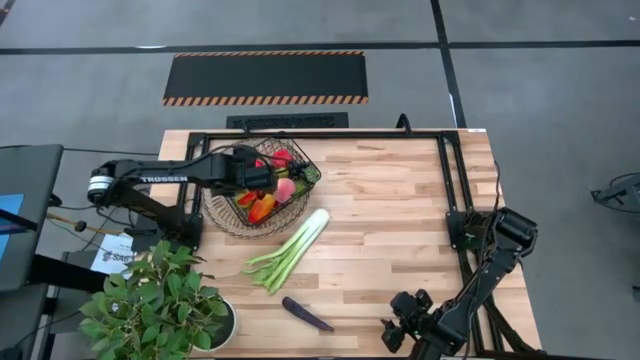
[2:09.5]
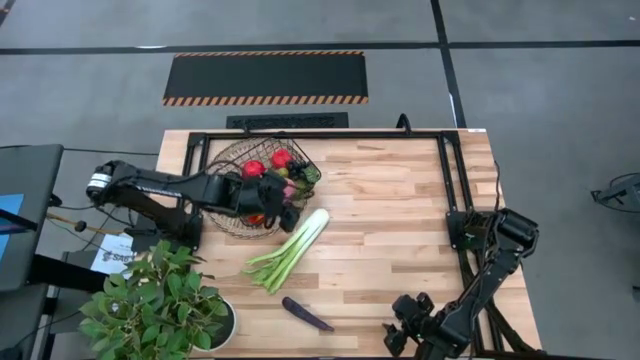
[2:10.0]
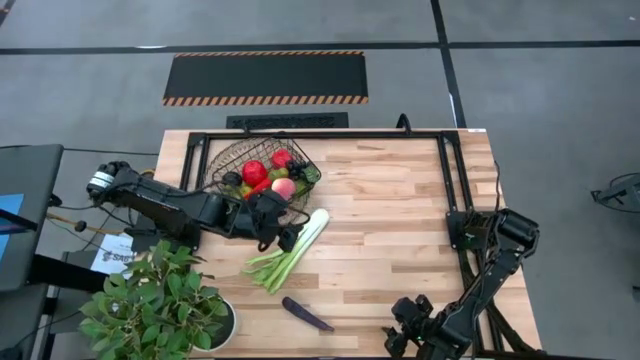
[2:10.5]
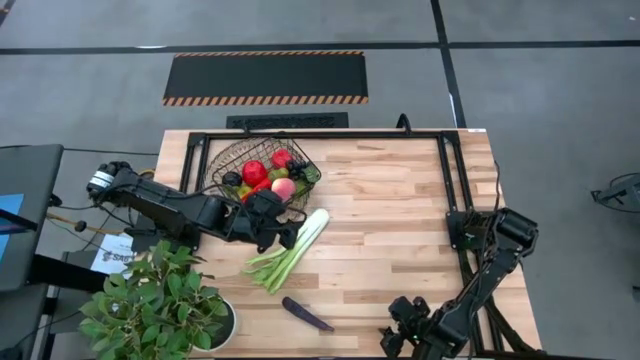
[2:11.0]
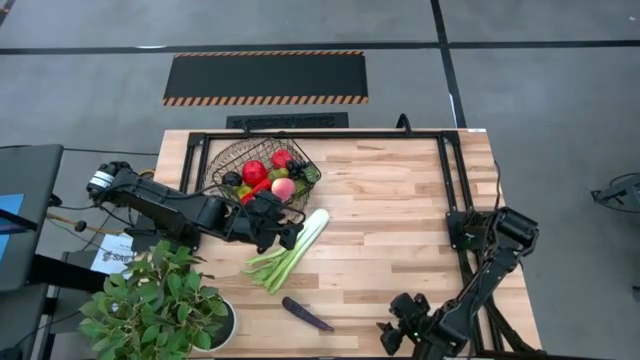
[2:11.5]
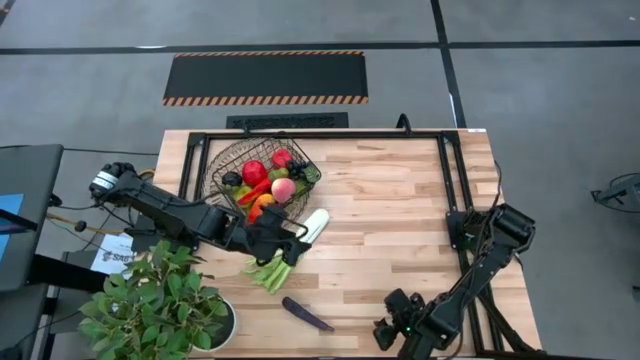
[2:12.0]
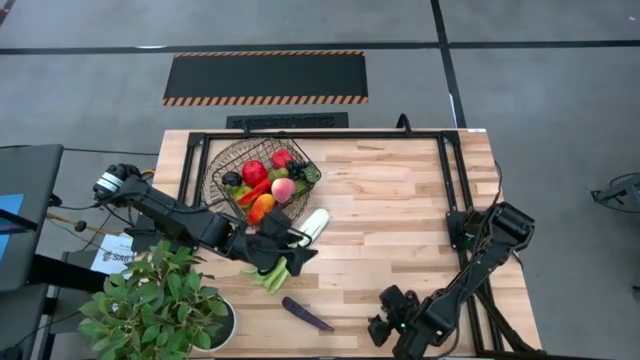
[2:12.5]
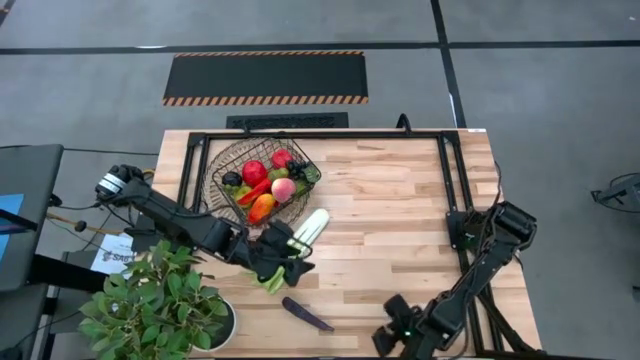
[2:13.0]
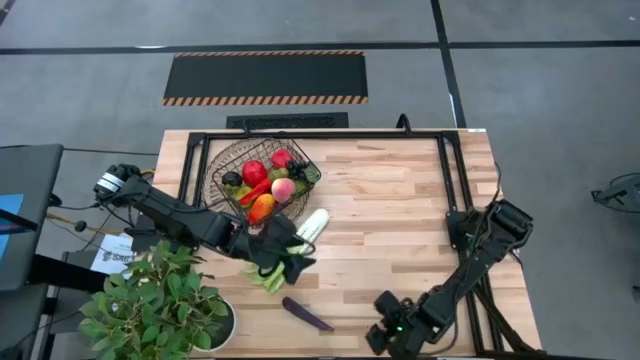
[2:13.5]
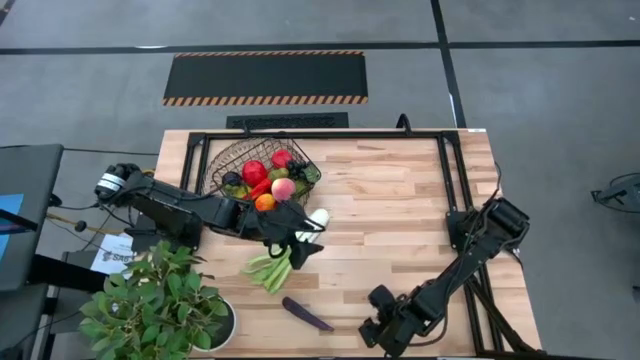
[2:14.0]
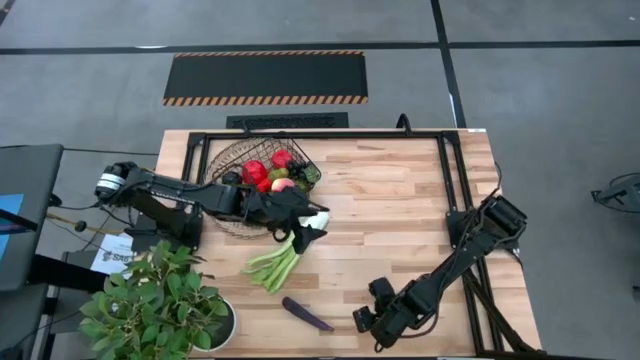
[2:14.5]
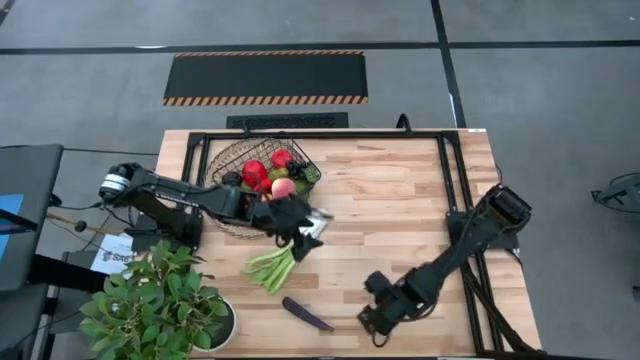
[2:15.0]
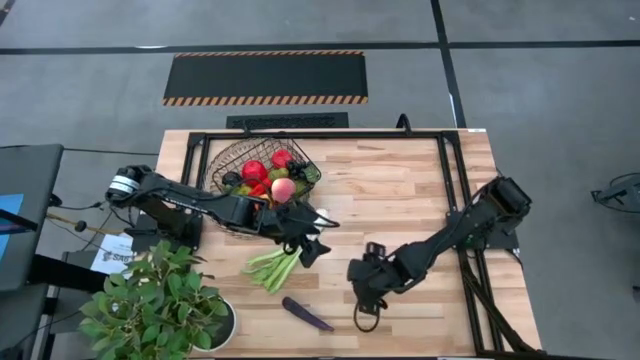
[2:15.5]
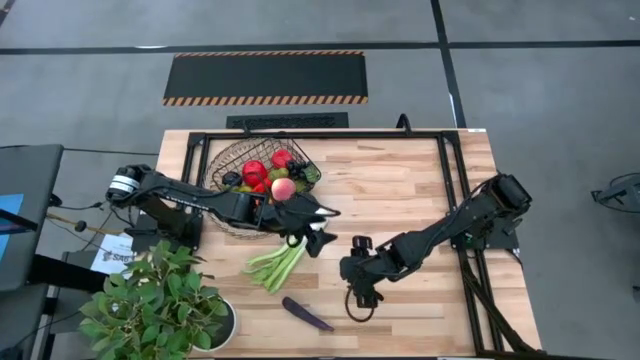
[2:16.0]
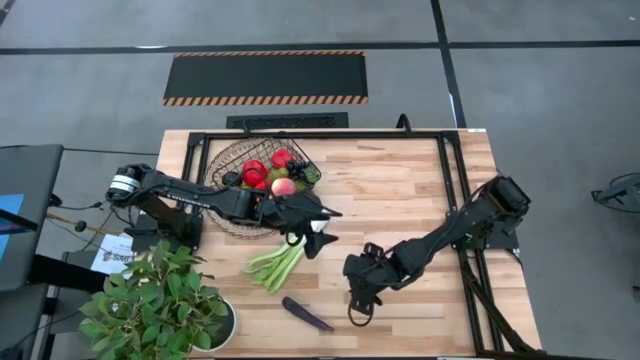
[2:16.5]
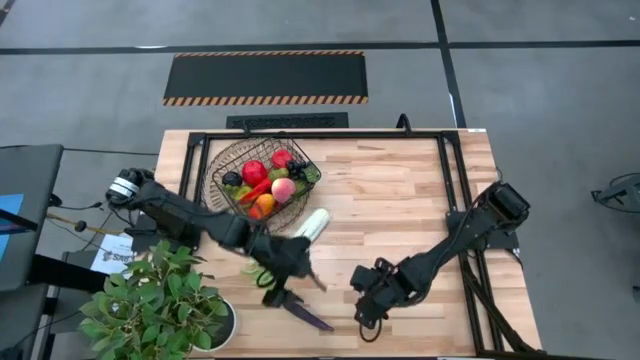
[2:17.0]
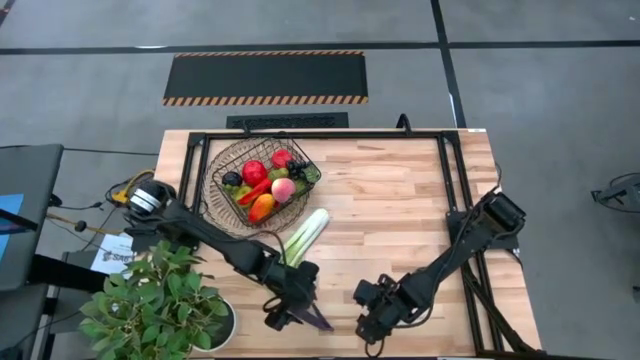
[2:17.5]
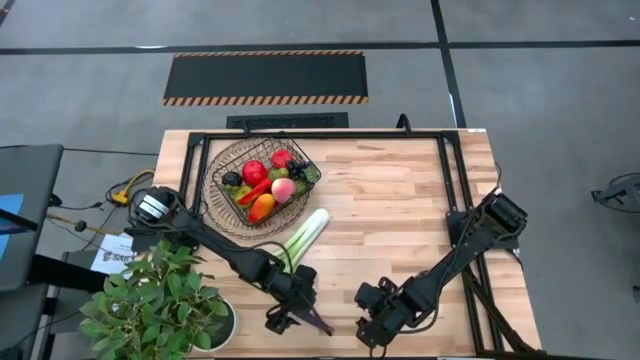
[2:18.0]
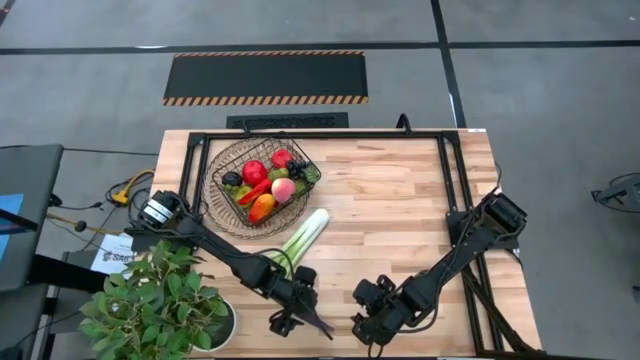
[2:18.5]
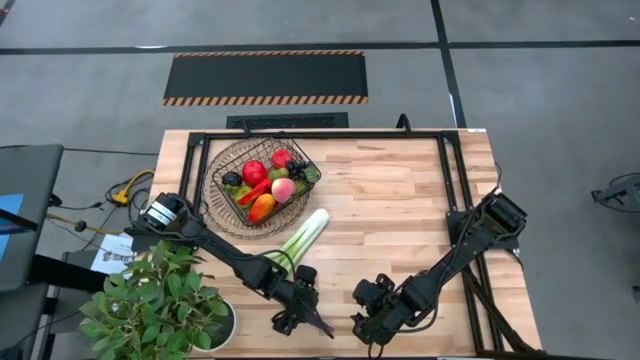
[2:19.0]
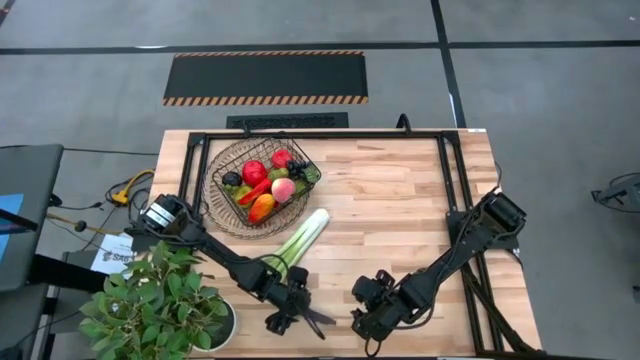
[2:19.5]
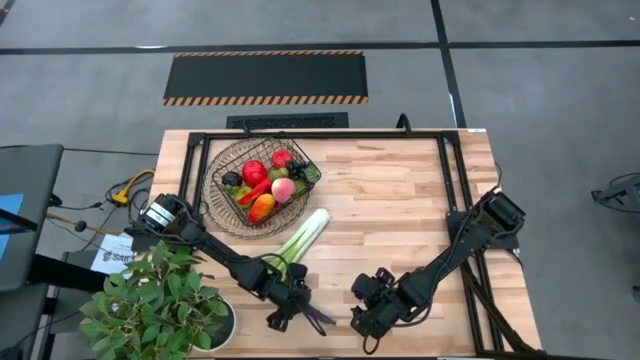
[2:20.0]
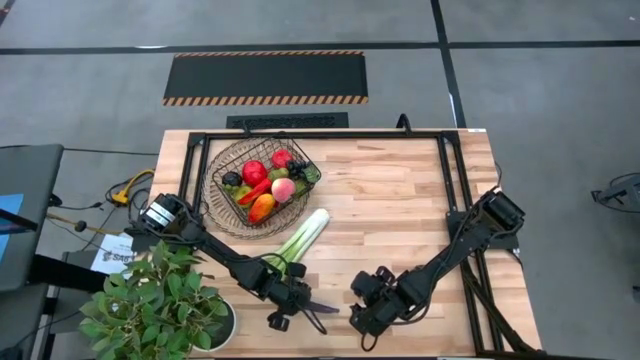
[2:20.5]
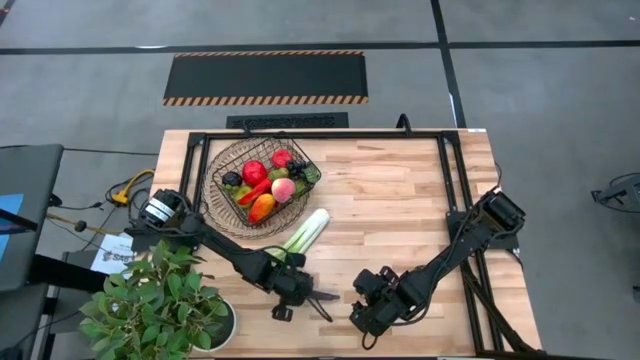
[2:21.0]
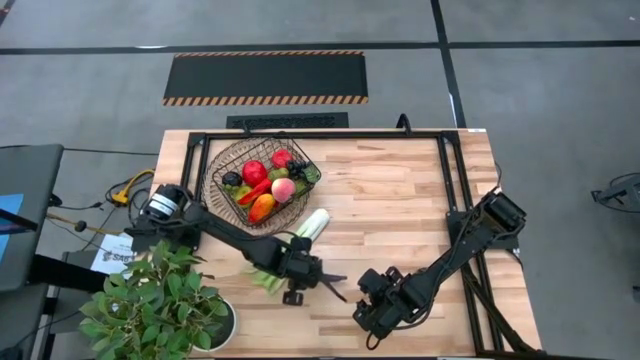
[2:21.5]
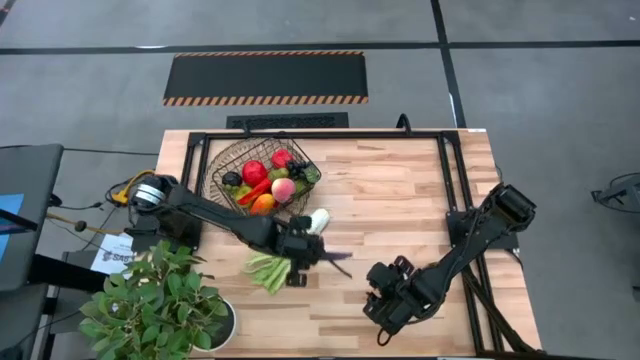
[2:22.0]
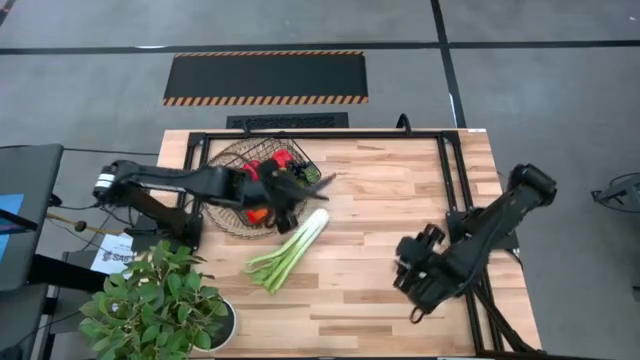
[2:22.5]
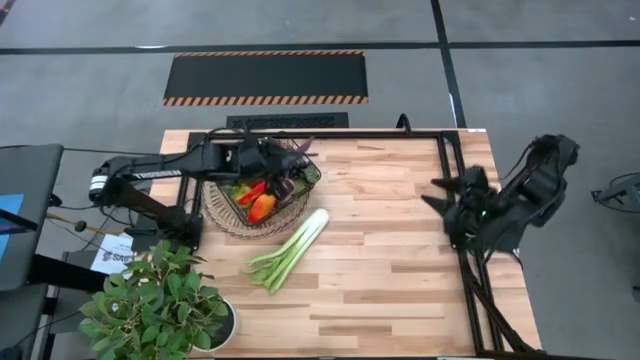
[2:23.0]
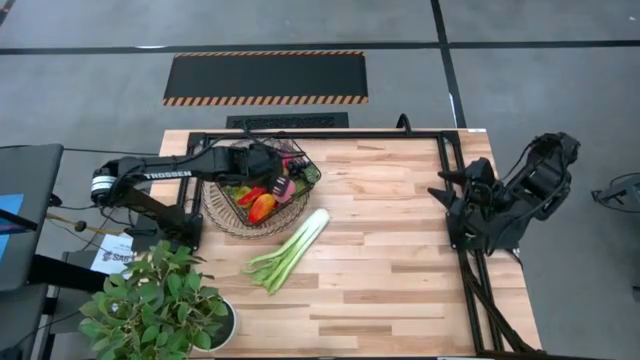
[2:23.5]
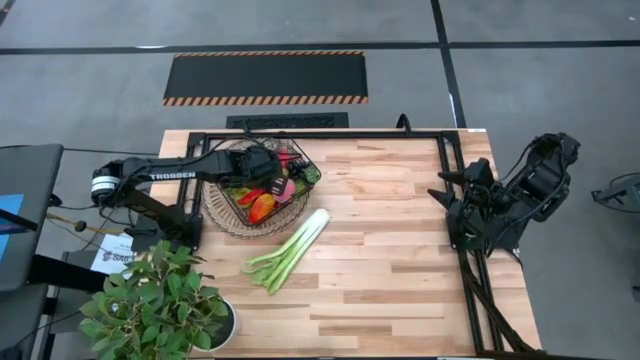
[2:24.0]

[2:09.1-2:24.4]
Task: Build produce basket
Put the violet eggplant into the wire basket

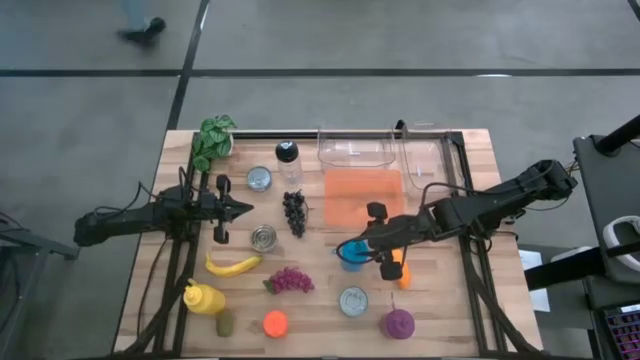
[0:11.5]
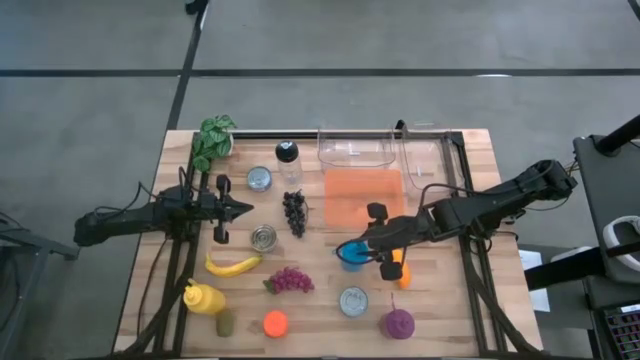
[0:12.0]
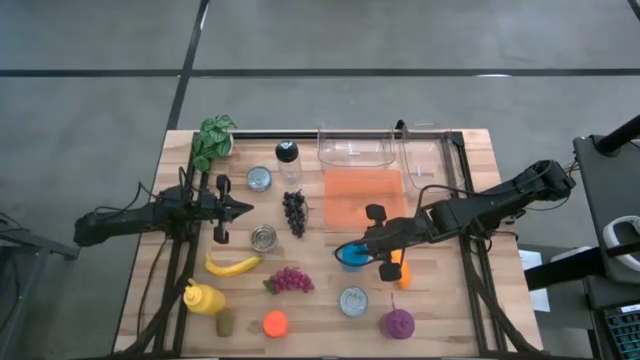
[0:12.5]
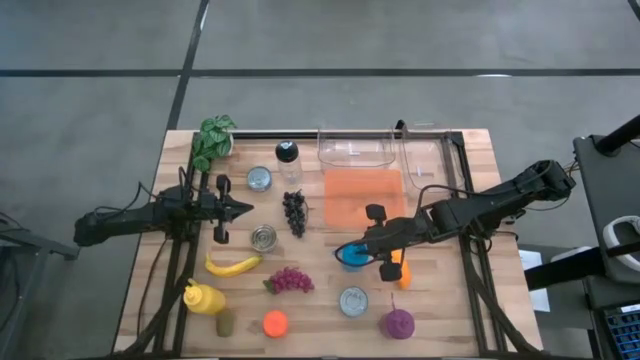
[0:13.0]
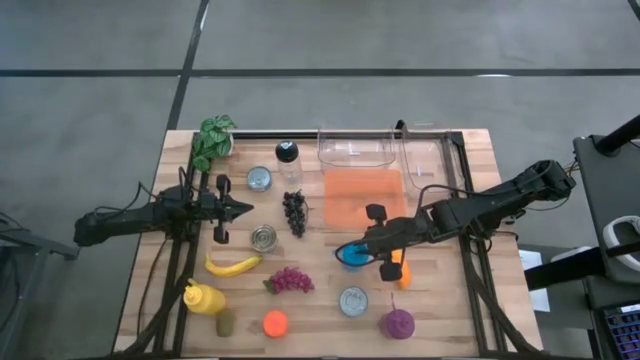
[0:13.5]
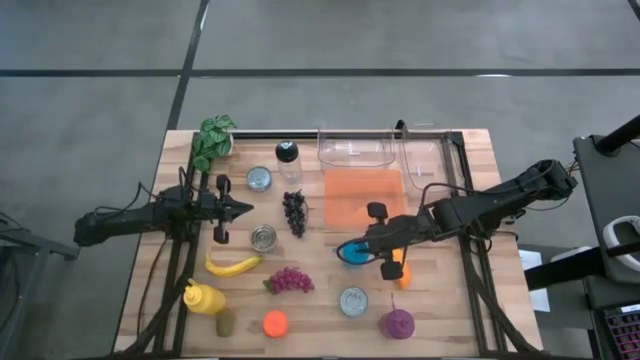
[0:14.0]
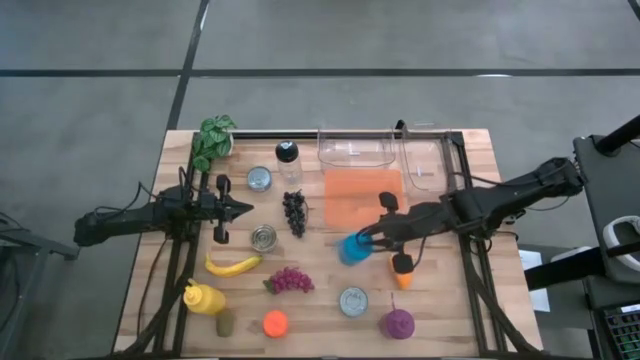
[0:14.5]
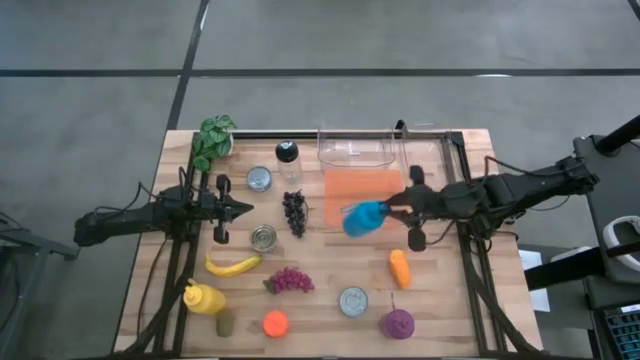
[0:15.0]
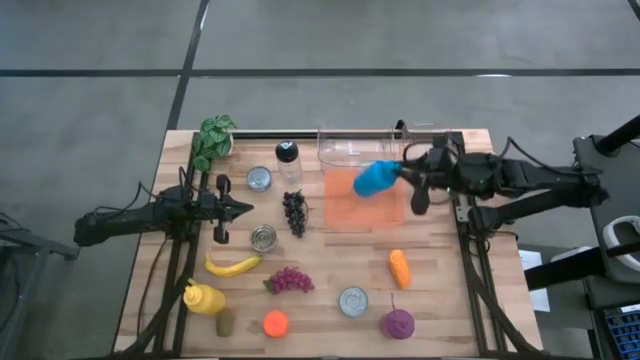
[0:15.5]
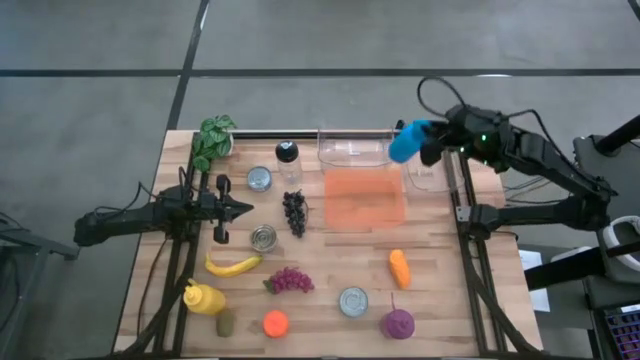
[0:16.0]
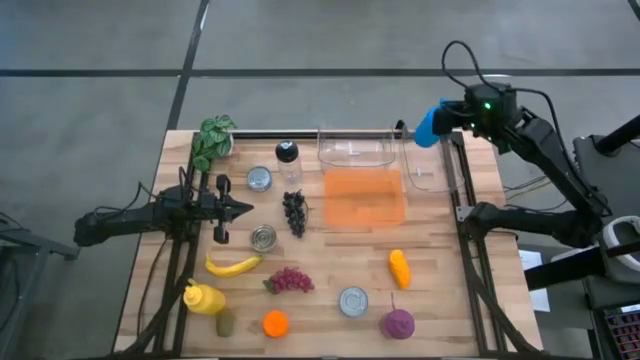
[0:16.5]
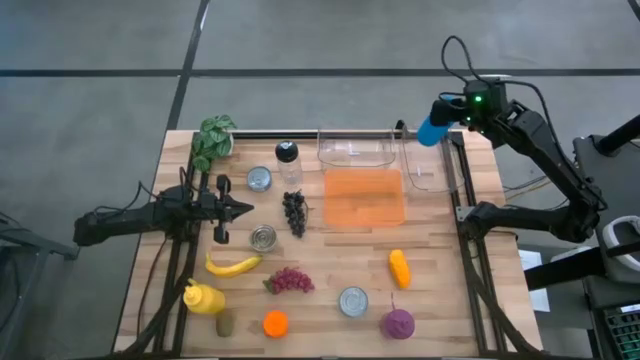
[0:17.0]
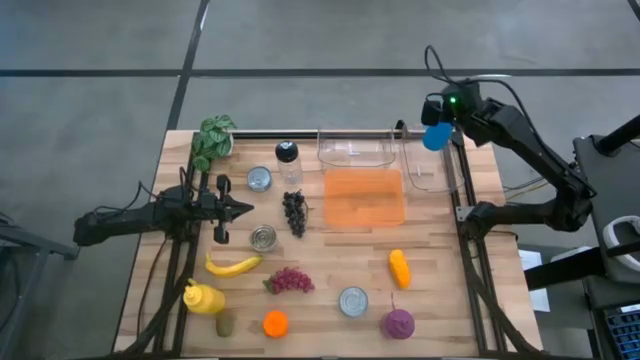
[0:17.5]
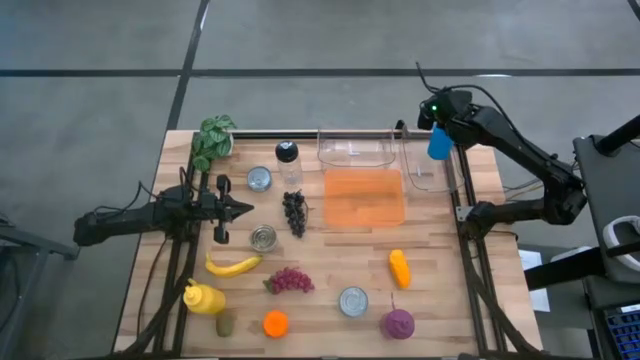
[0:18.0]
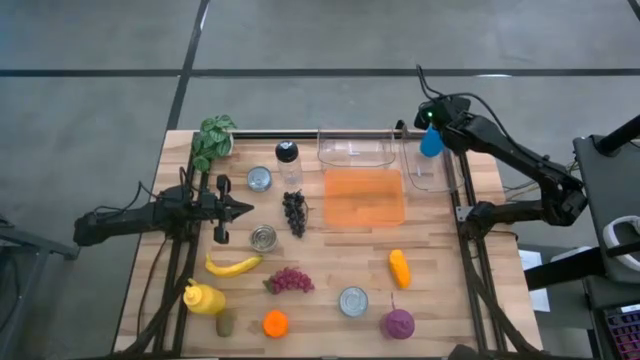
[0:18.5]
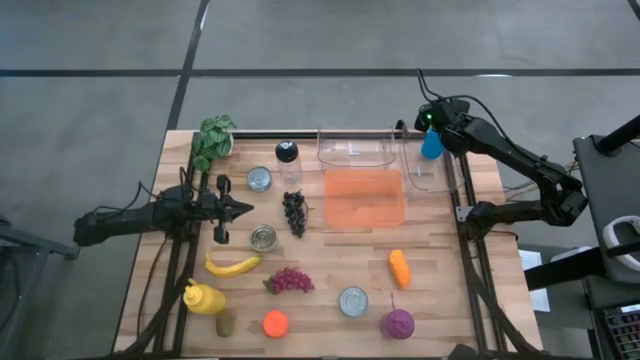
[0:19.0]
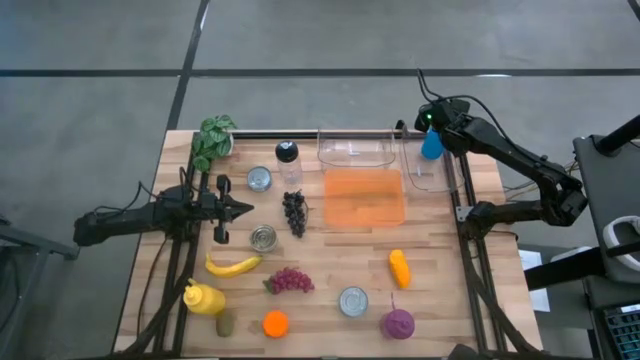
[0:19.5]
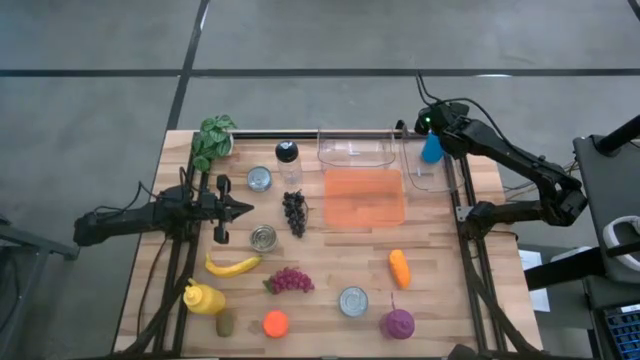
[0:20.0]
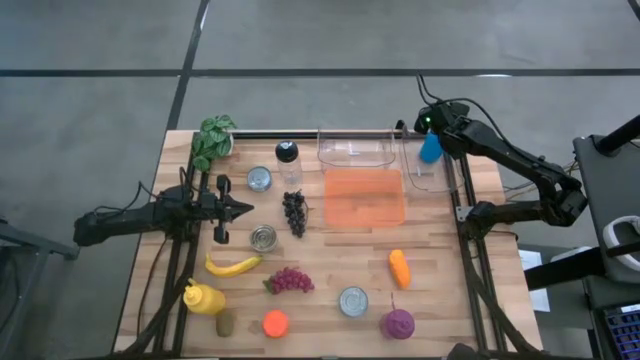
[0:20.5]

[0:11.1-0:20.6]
Task: Pick & Place Food Item
Put the blue water bottle into the right transparent bin
